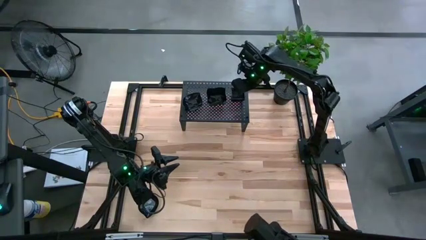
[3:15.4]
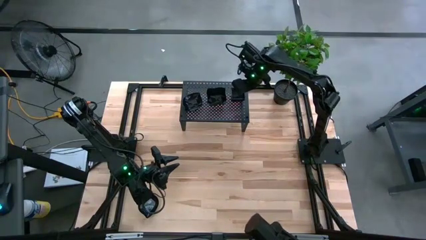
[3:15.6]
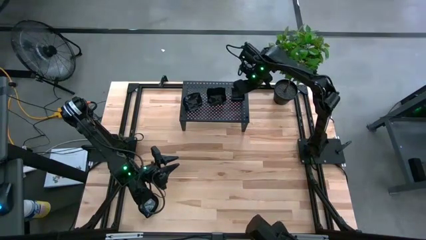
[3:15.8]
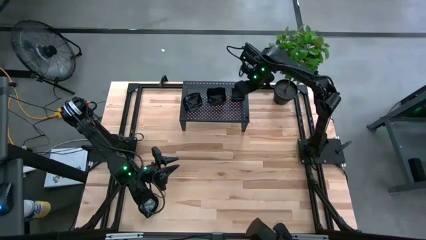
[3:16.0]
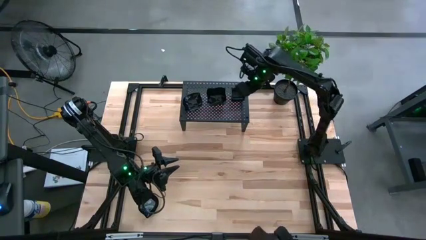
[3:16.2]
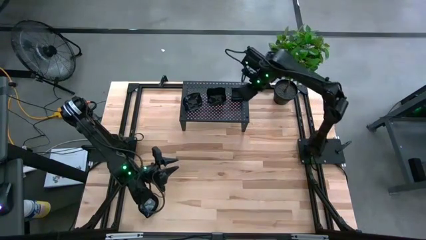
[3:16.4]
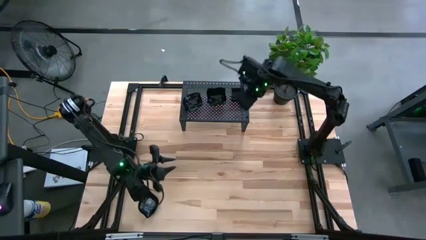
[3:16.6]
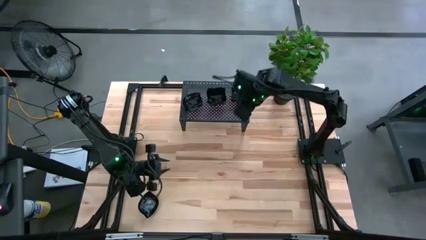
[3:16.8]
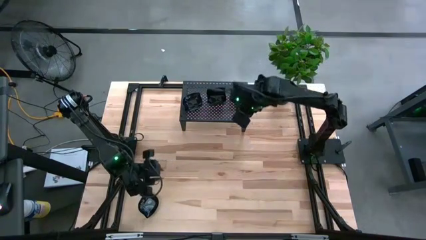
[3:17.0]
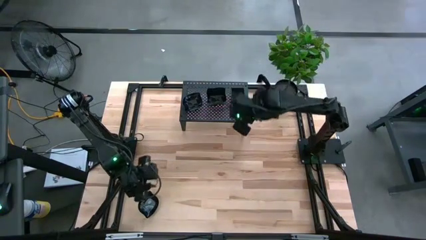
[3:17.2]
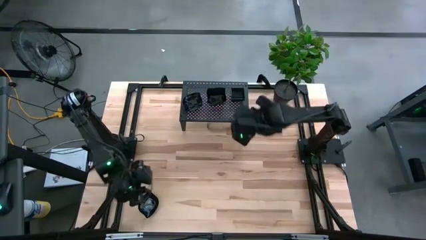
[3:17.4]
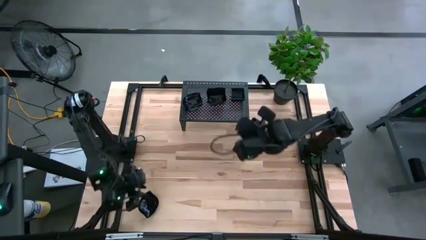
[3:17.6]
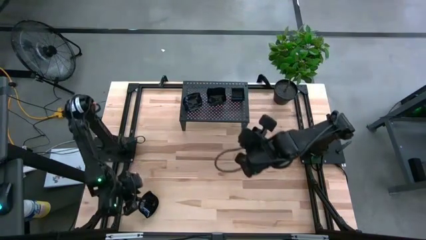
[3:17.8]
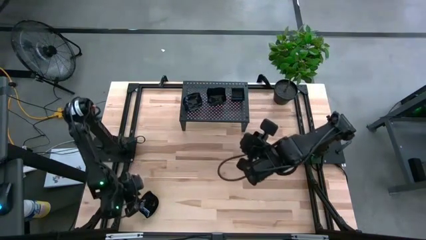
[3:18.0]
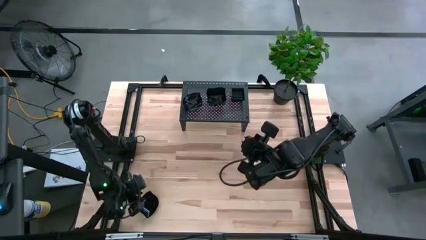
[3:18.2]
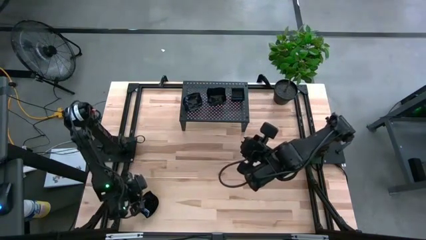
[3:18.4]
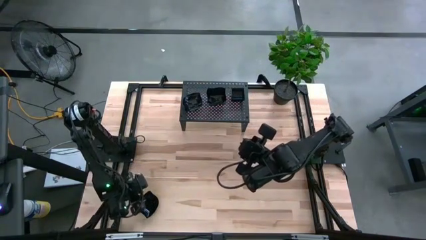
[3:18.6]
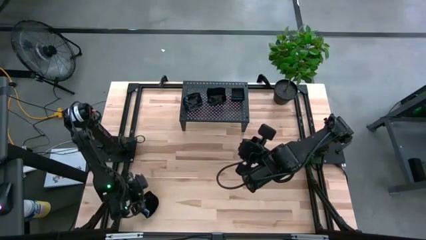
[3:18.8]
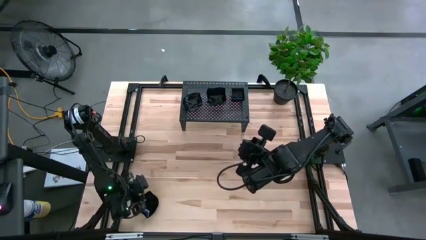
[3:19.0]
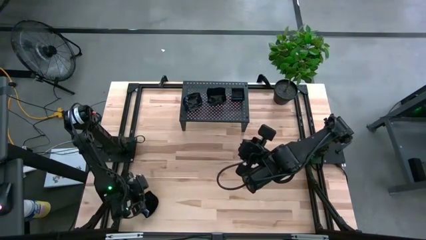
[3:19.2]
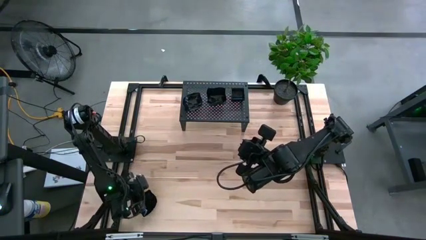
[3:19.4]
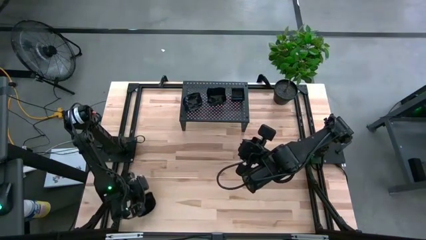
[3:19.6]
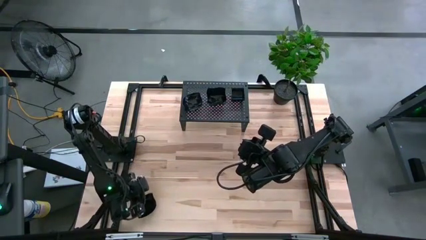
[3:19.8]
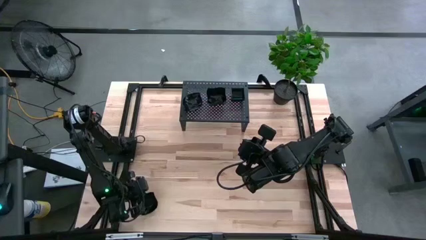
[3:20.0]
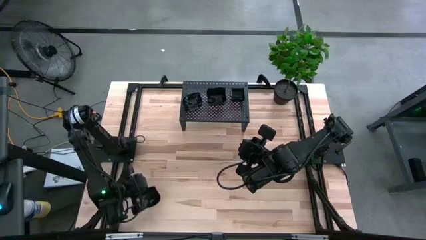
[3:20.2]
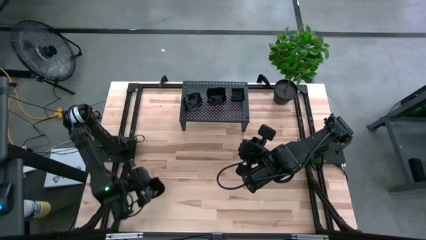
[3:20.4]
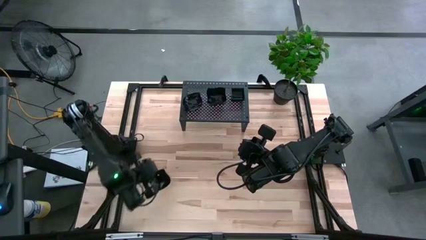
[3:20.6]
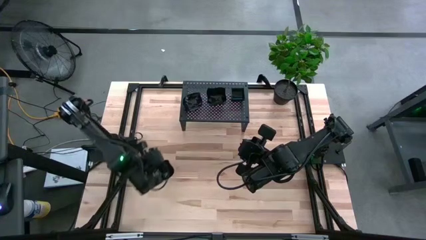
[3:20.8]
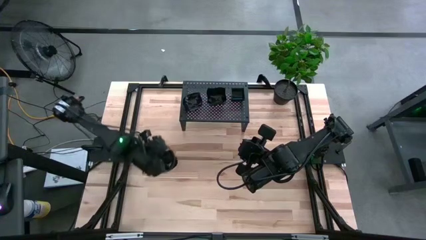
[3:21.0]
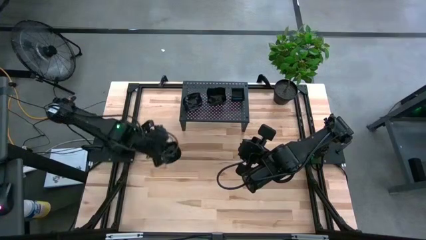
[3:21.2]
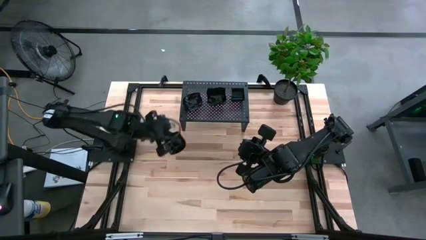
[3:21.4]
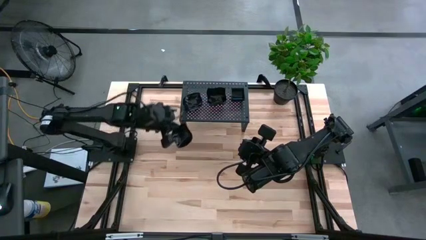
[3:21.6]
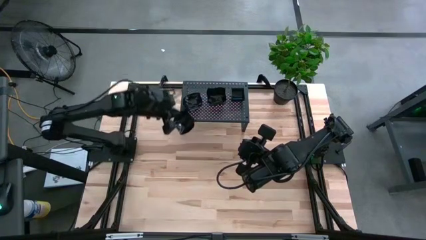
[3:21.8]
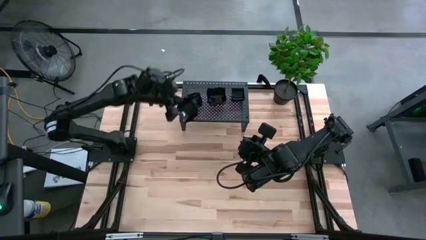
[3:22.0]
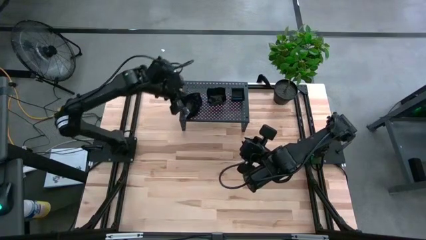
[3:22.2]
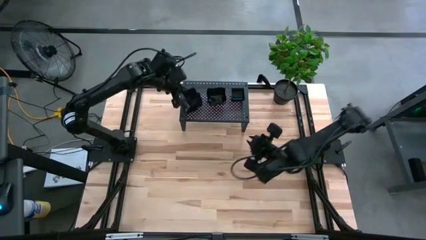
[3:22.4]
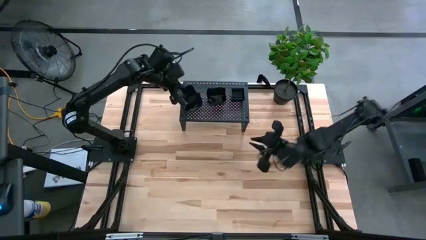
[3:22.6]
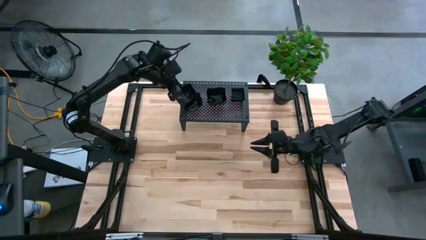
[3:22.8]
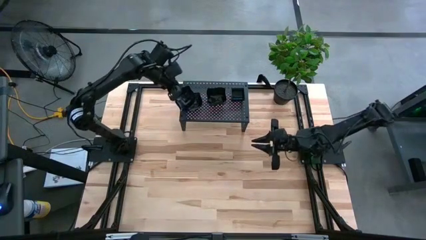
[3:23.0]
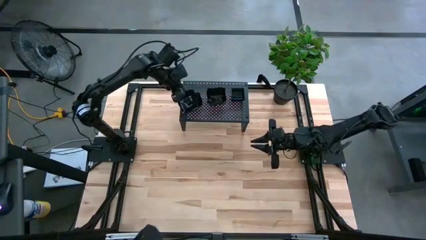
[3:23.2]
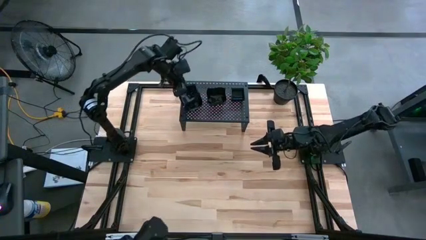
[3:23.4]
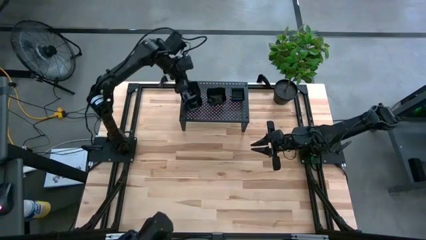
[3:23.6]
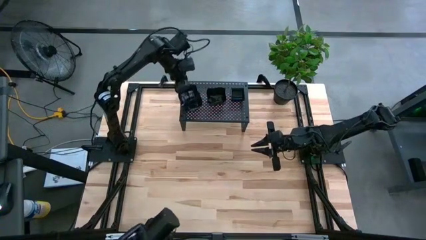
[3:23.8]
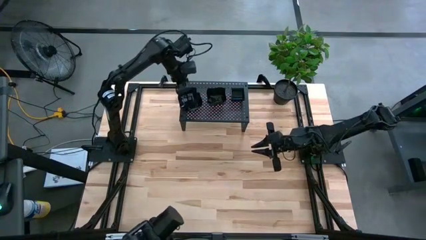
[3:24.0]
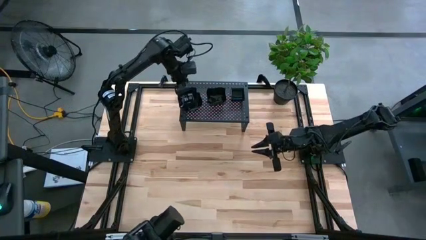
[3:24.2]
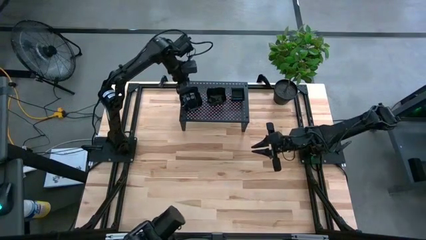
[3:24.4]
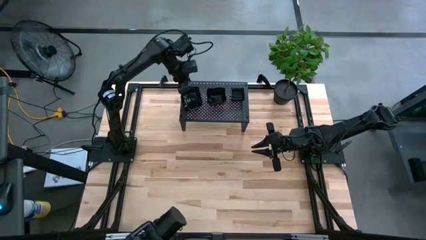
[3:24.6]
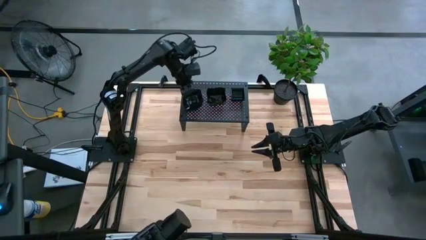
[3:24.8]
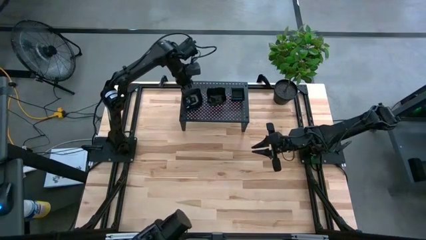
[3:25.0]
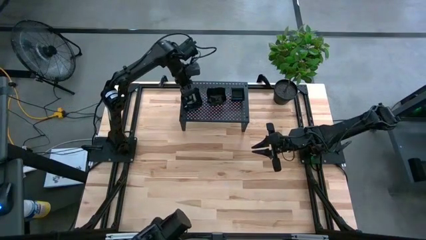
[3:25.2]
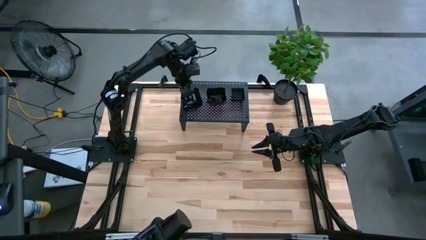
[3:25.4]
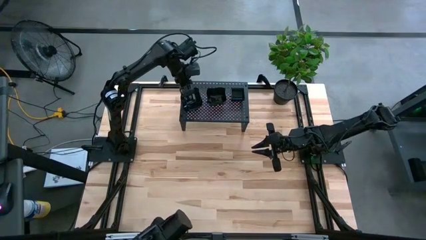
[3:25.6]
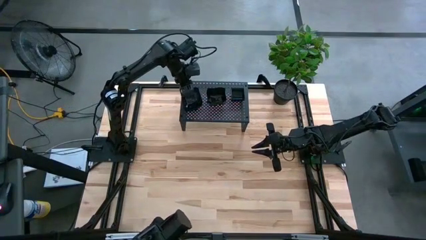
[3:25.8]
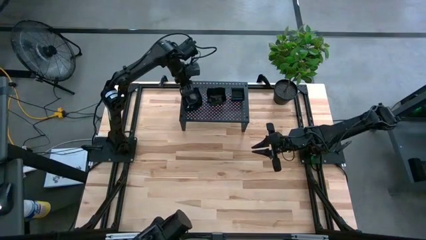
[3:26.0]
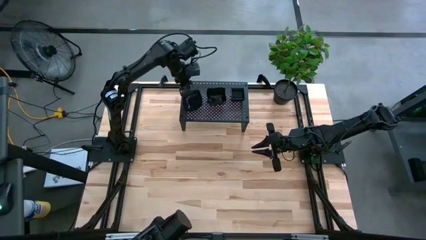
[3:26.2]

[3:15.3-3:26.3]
Task: Pick & Place Mini shaped plates
Stack the leaf shaped plate on top of the leaf shaped plate on the shelf

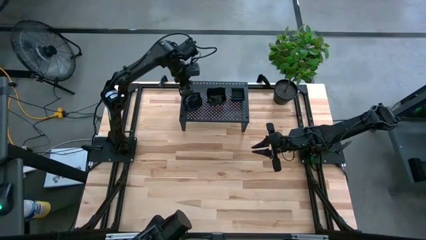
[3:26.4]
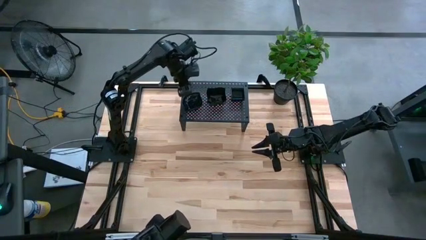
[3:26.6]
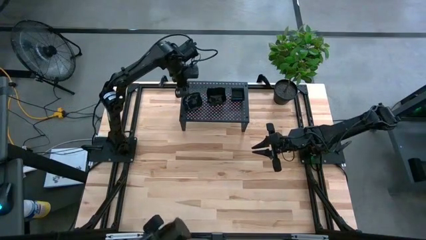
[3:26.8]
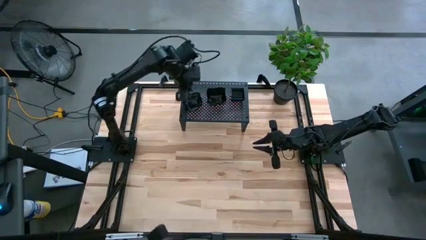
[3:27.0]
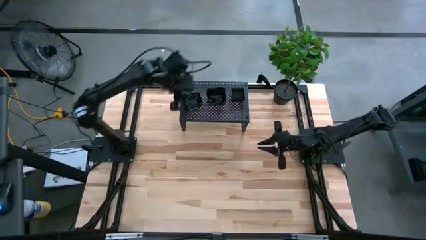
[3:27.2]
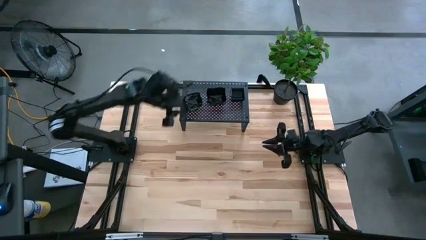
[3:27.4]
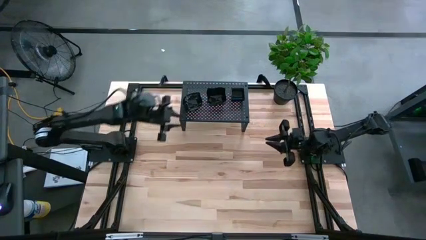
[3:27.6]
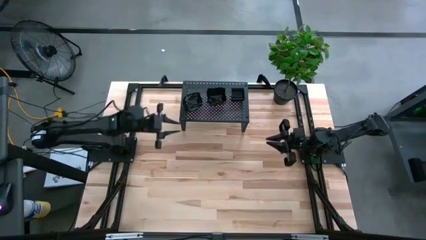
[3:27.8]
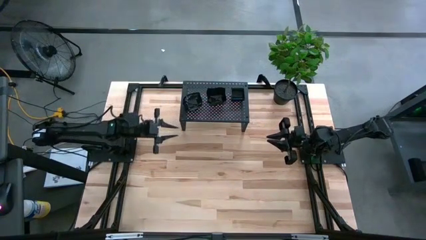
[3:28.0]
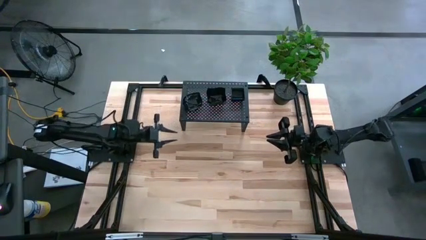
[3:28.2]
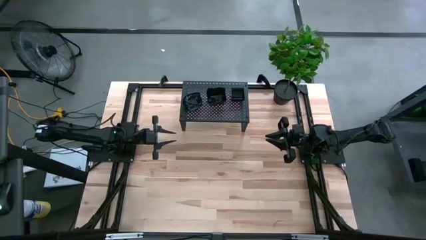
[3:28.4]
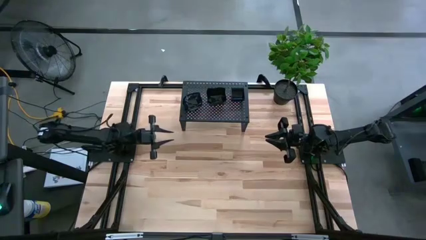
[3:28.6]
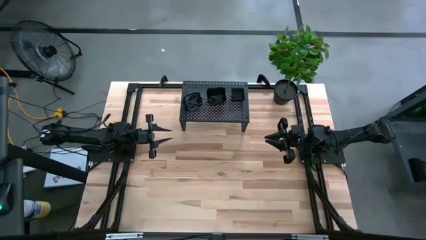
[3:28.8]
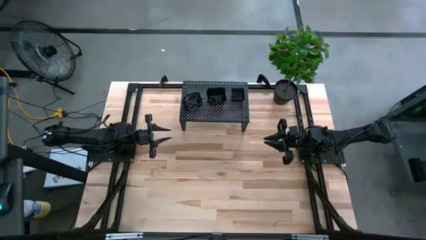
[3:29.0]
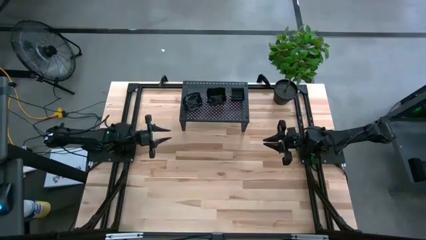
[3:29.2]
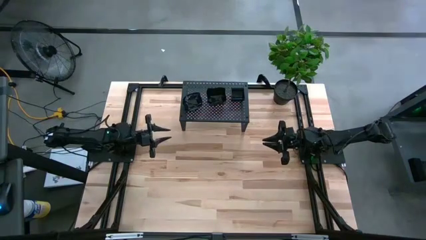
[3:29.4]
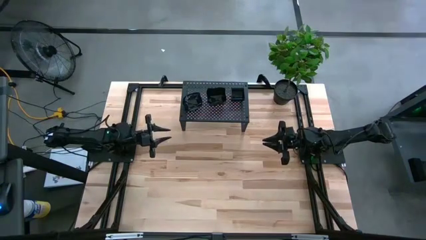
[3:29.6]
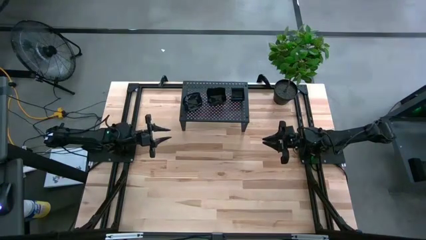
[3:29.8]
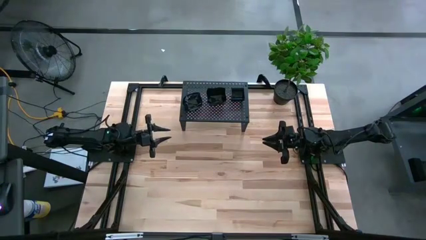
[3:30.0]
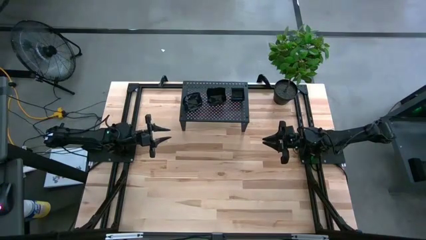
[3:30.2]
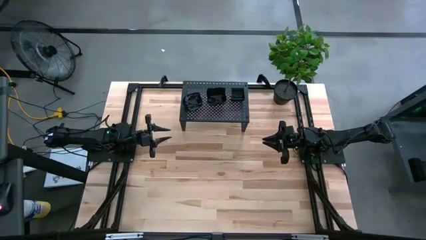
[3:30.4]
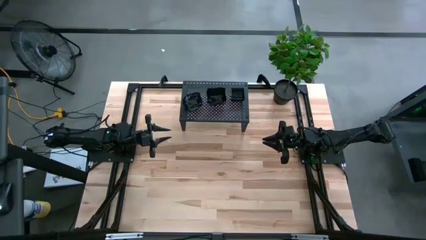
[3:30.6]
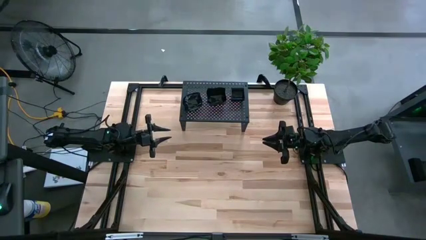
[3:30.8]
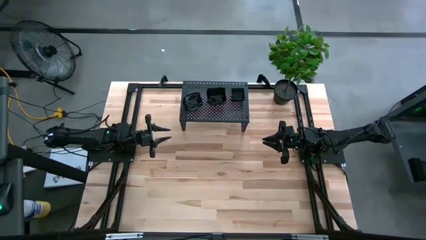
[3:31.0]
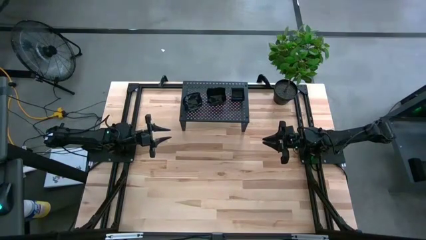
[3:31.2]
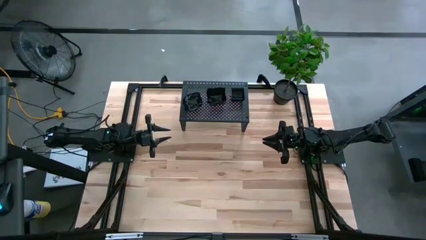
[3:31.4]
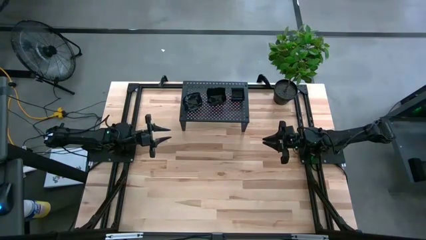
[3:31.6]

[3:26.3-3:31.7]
Return to Home Position
